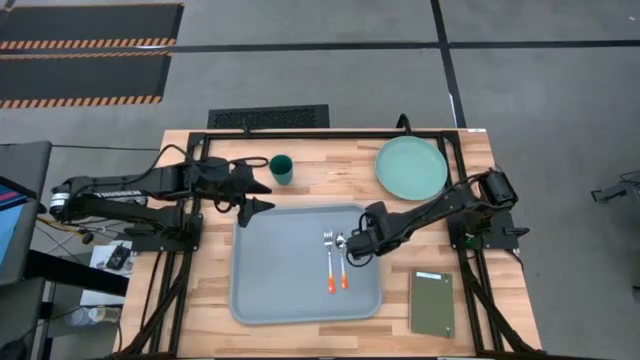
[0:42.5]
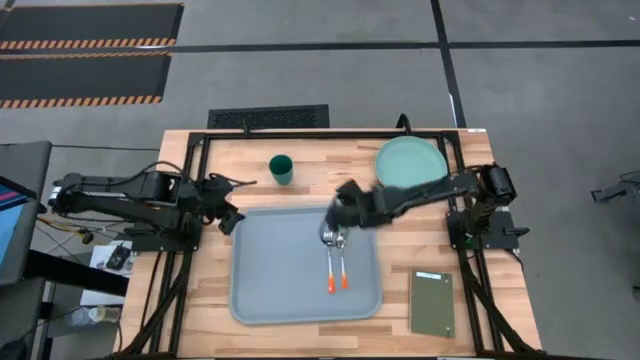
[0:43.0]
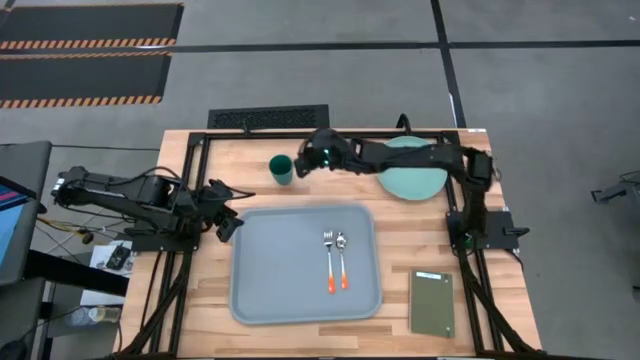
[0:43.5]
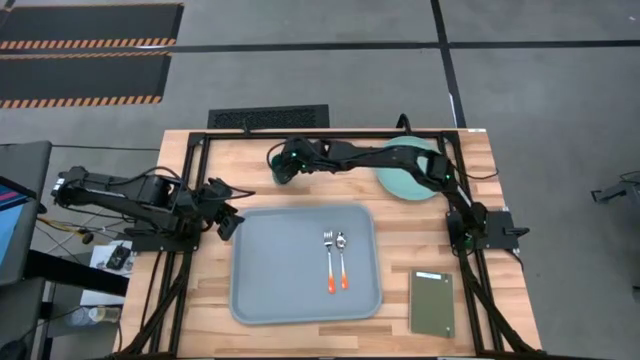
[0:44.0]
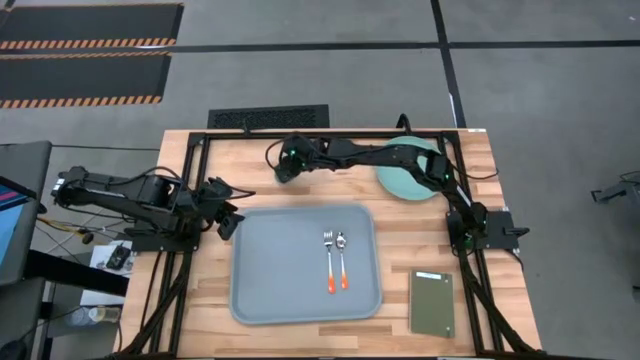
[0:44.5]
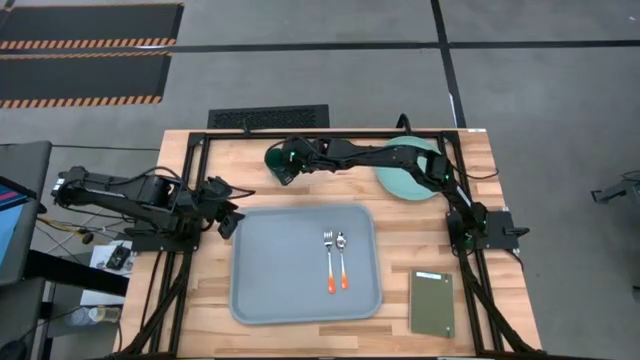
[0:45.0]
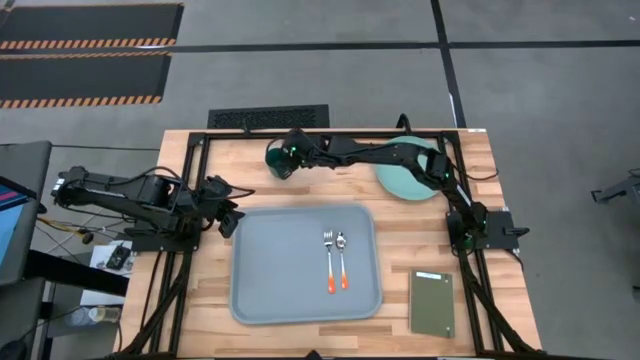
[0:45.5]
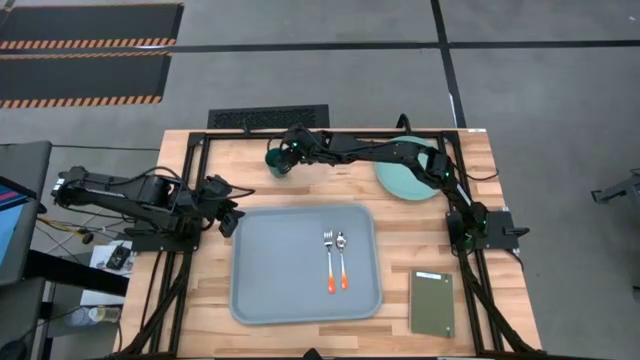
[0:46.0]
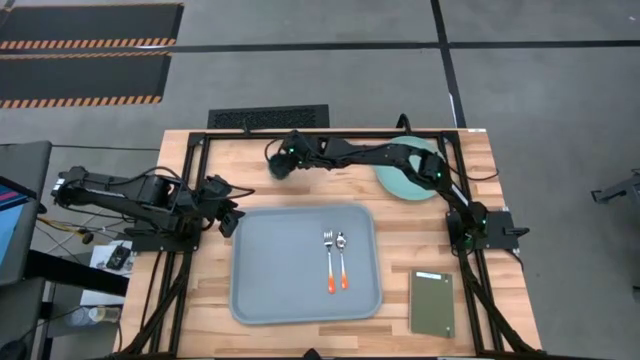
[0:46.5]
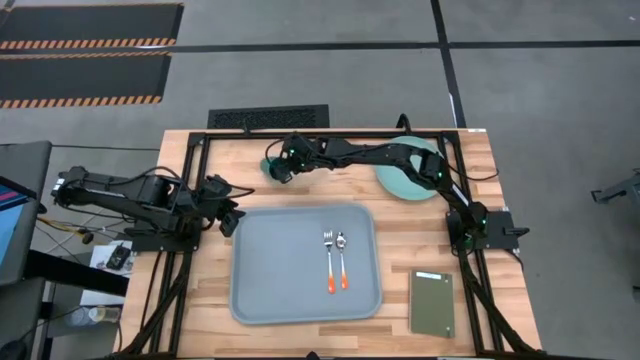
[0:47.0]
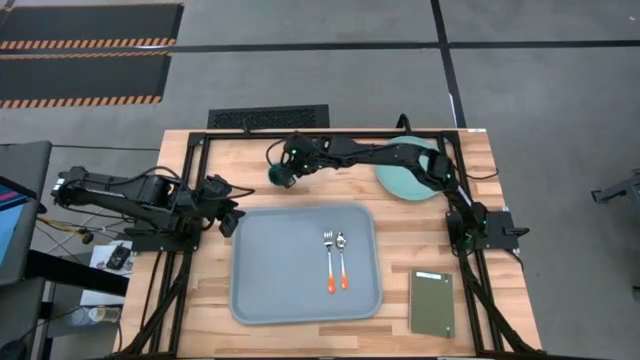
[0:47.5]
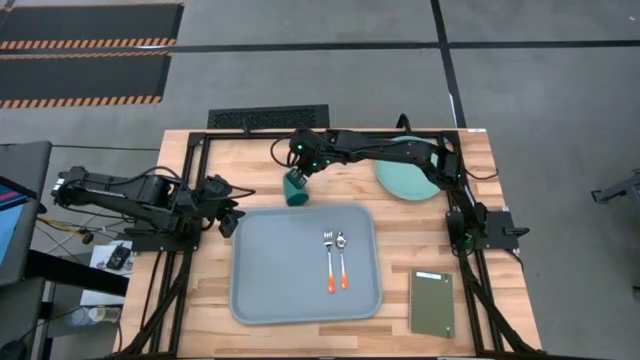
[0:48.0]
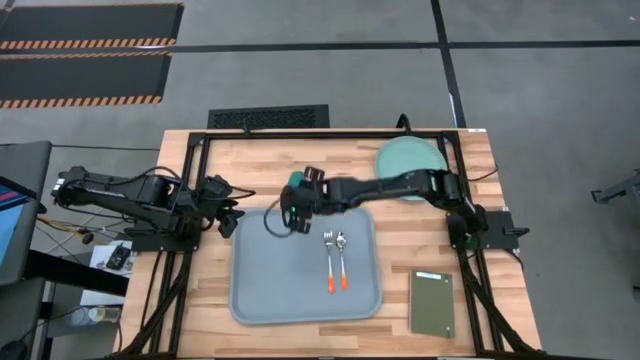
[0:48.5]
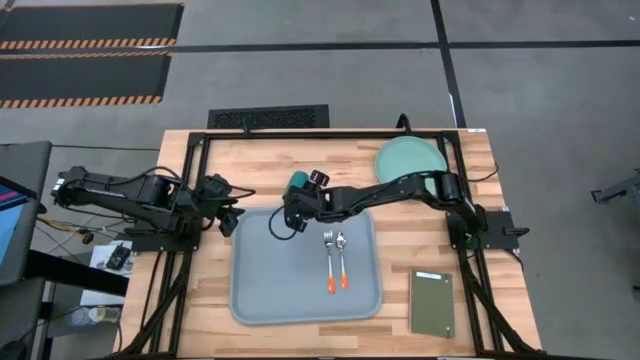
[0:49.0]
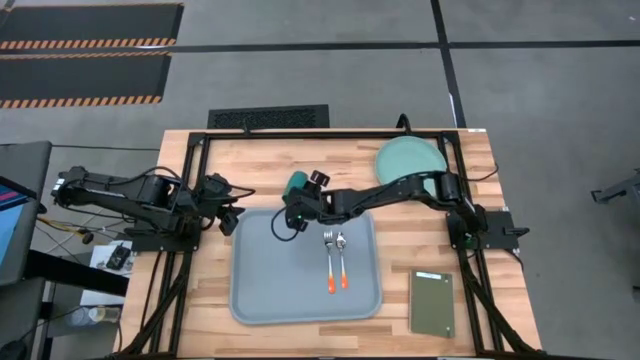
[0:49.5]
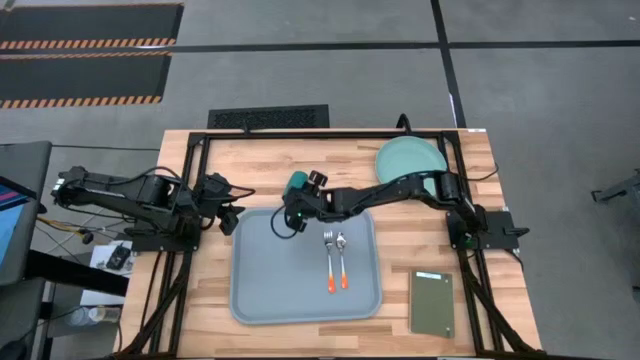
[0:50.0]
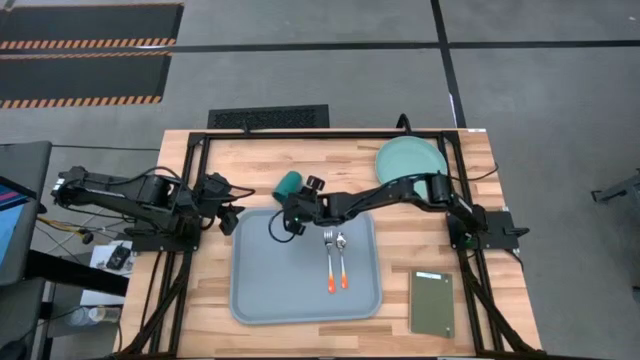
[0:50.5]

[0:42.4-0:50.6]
Task: Pick and place plate/cup/fork/spoon on tray
Put the green cup on the top left of the gray tray

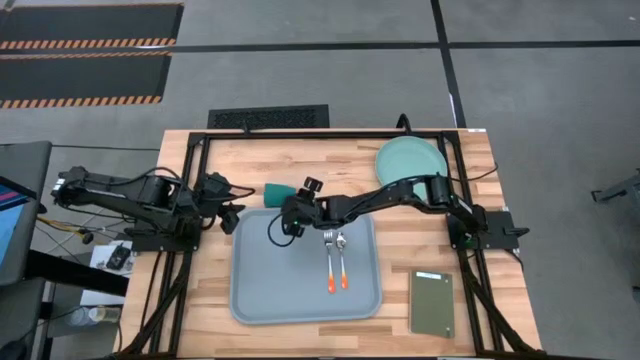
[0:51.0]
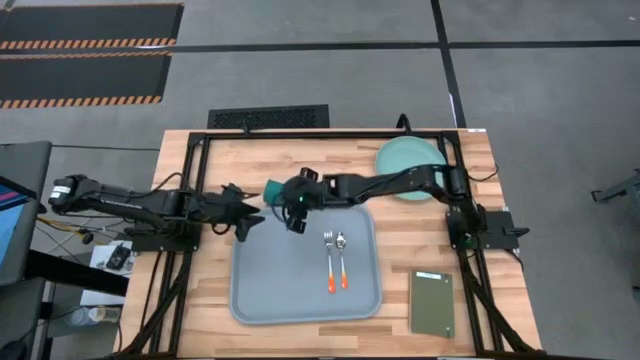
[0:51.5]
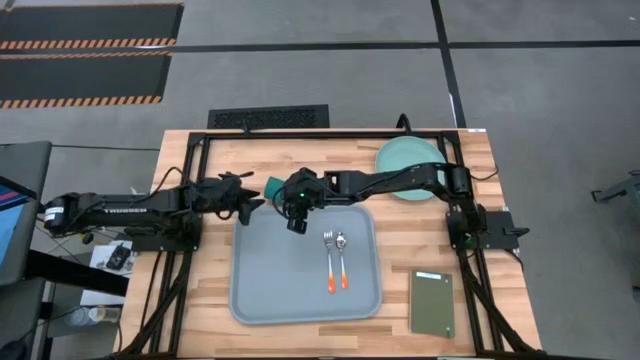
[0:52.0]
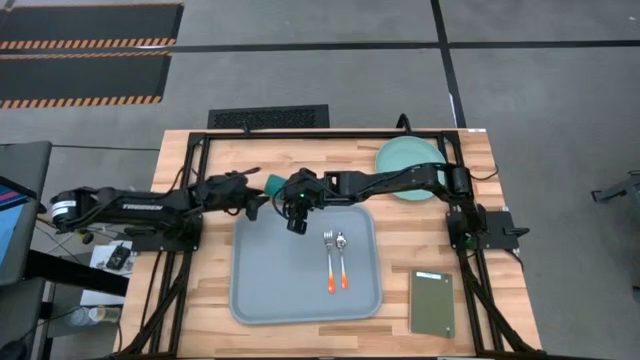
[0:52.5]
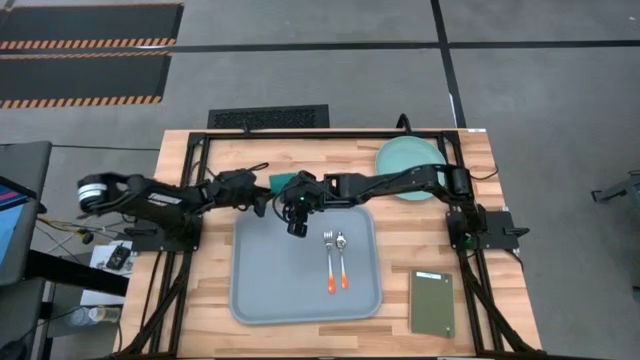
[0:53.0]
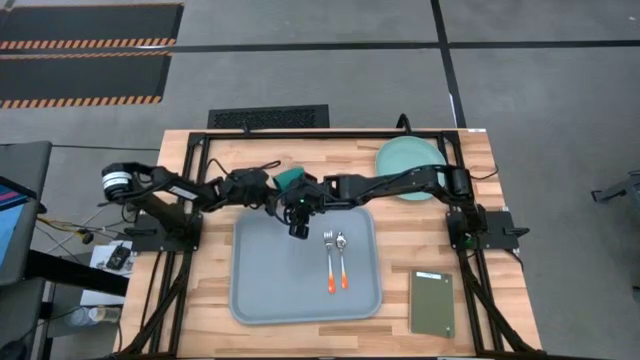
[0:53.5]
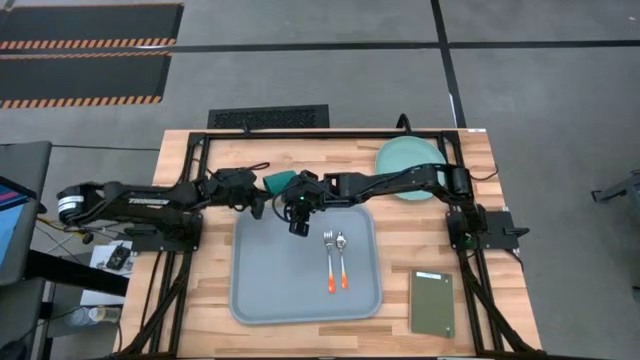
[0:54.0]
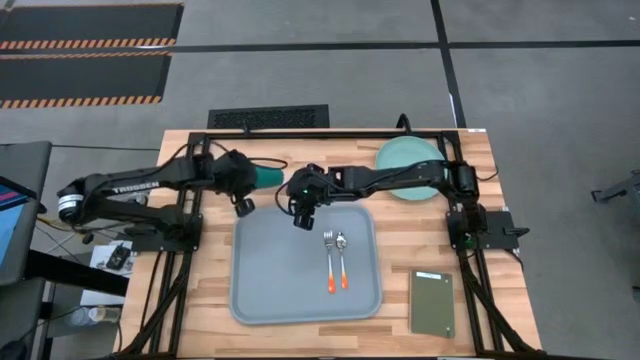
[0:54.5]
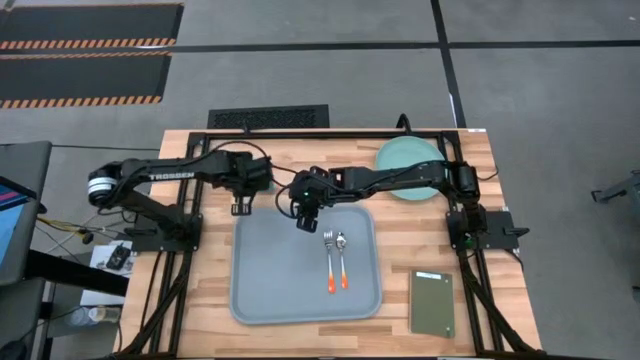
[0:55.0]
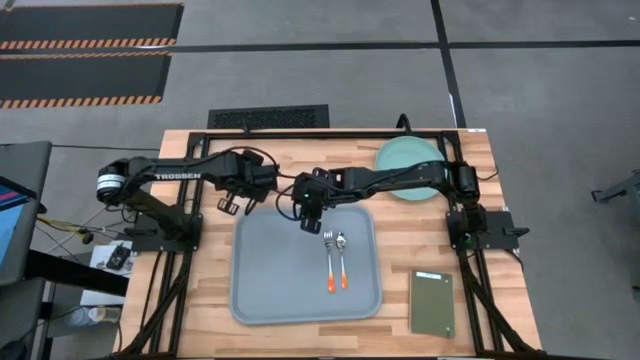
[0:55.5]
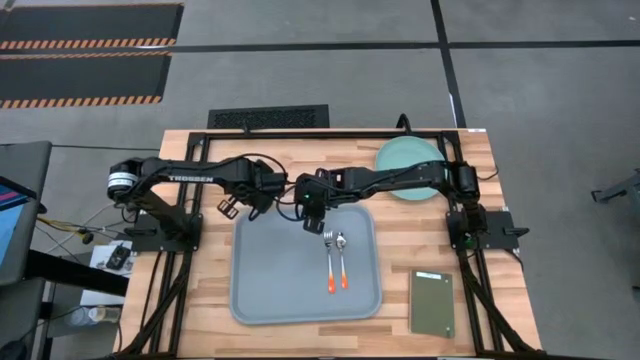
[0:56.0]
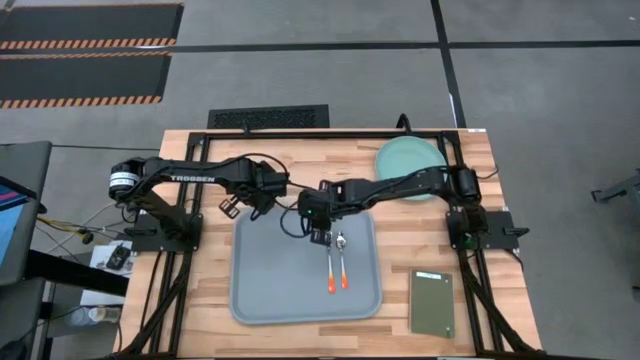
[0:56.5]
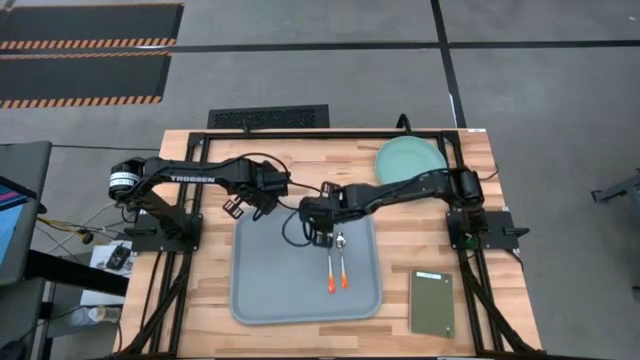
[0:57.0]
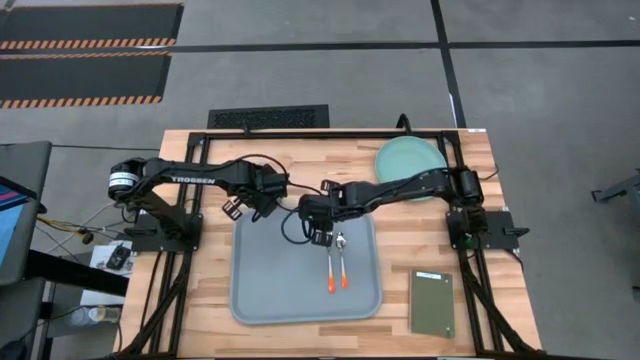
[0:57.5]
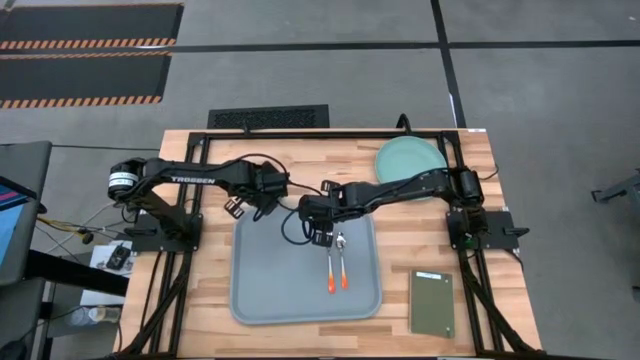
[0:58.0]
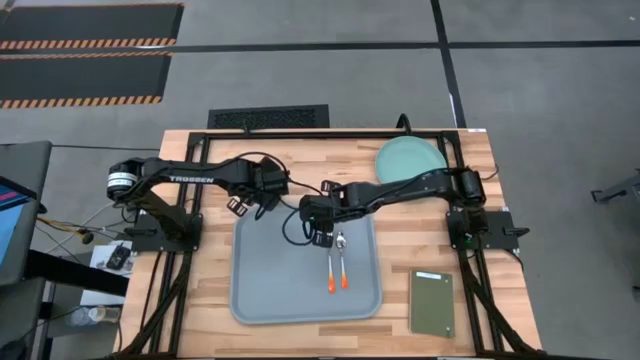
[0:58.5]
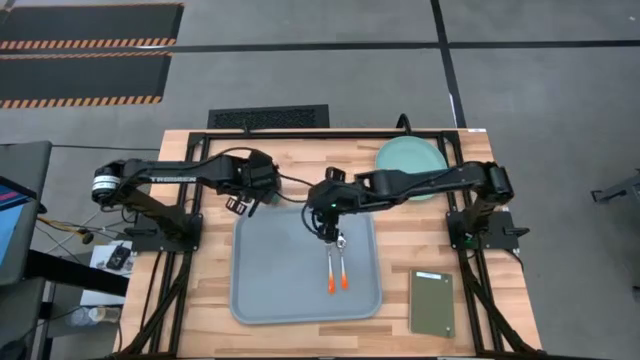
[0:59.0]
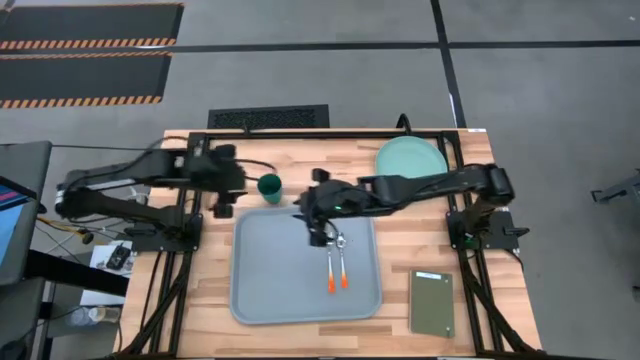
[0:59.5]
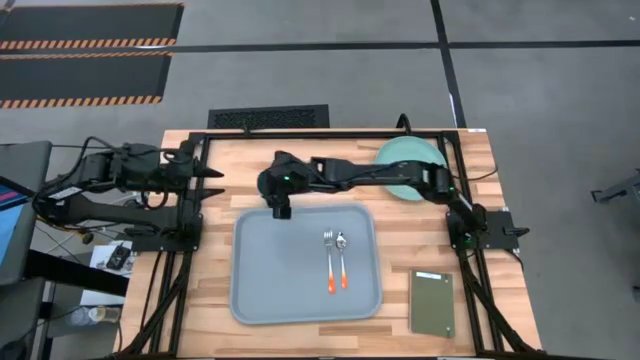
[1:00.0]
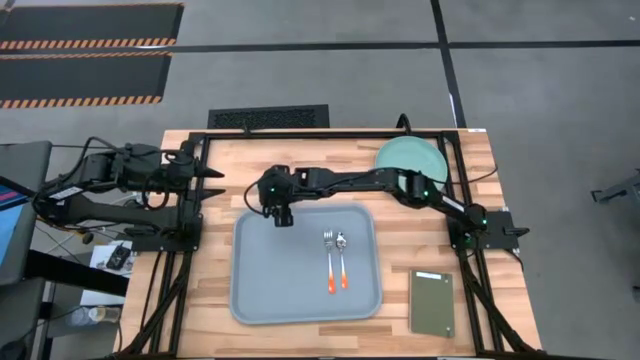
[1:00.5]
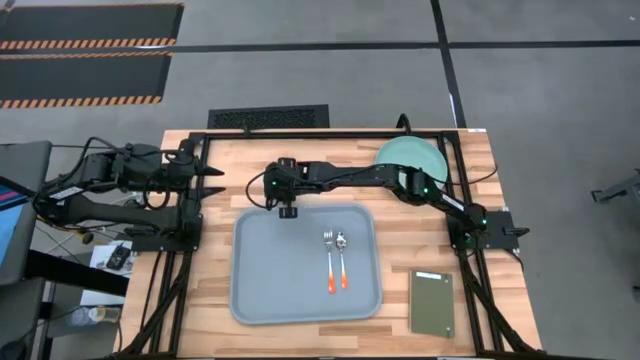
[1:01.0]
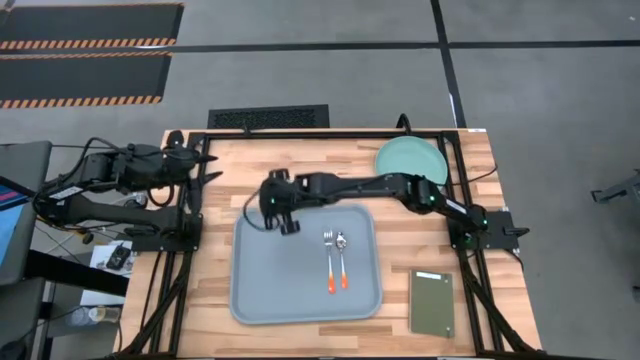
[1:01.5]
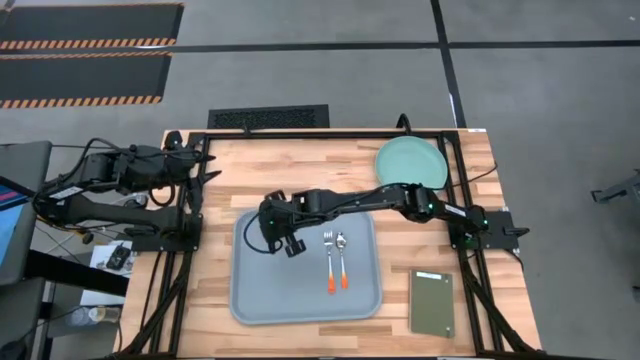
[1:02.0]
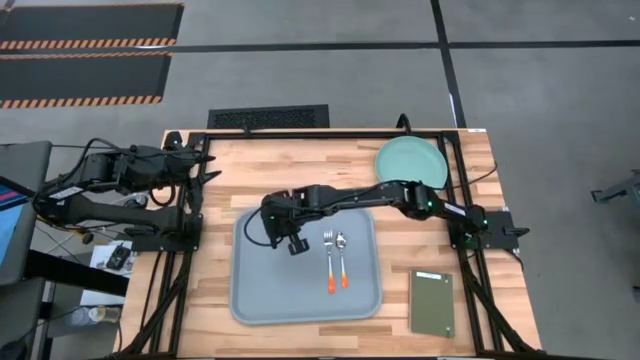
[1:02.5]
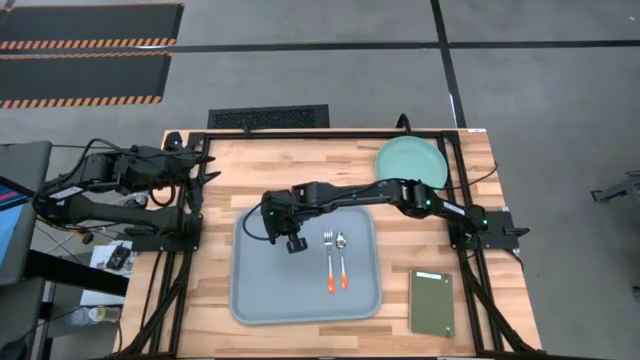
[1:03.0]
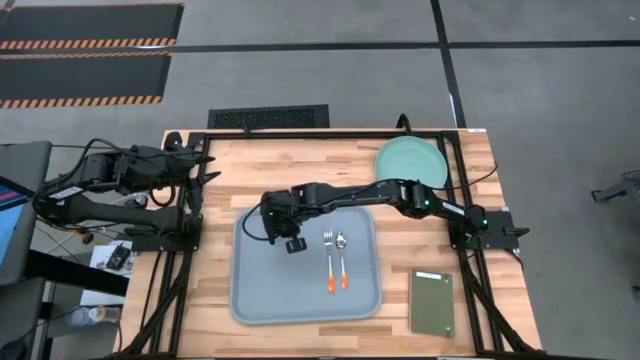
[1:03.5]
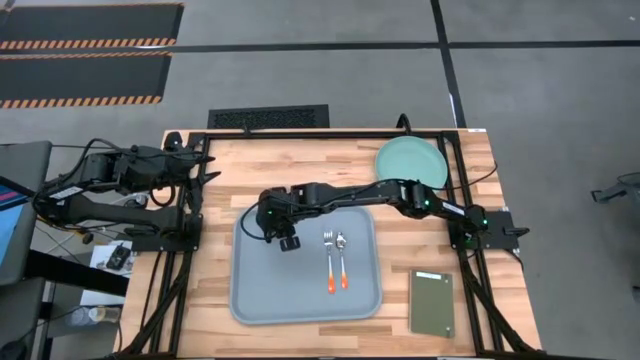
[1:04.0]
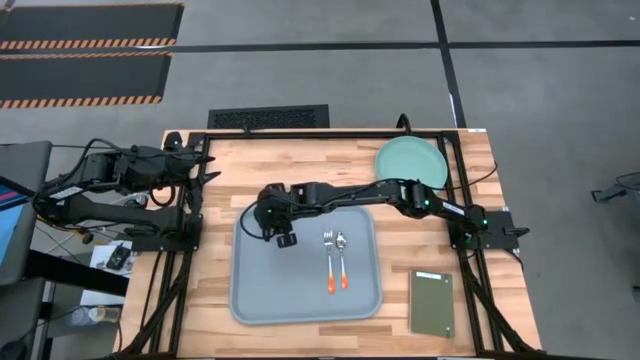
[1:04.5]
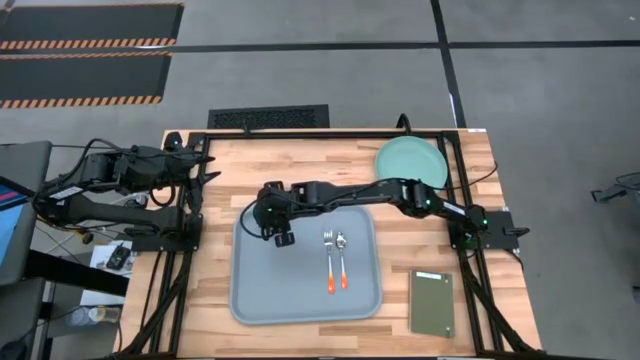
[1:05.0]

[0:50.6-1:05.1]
Put the green cup on the top left of the gray tray
